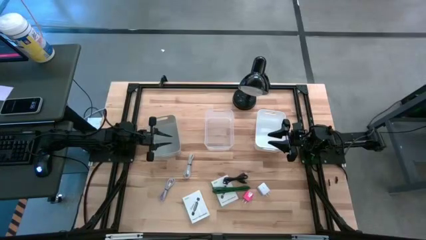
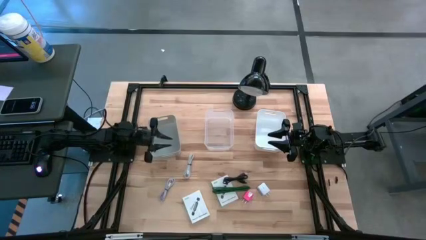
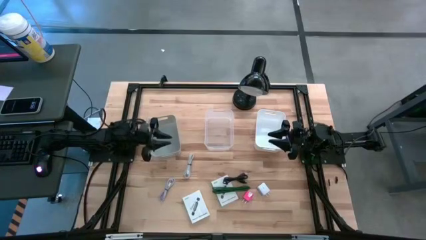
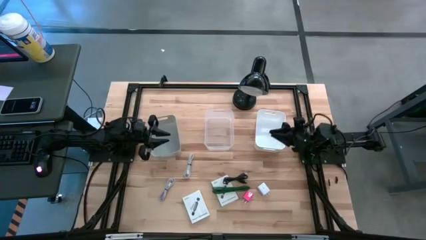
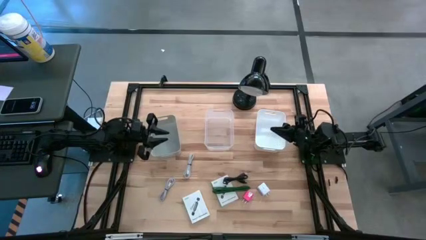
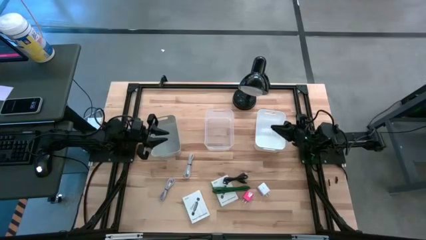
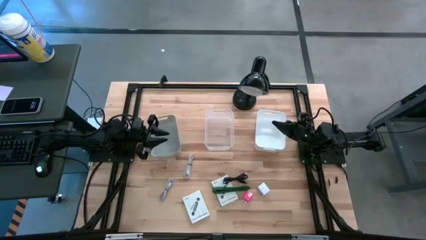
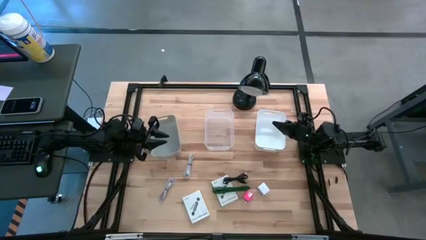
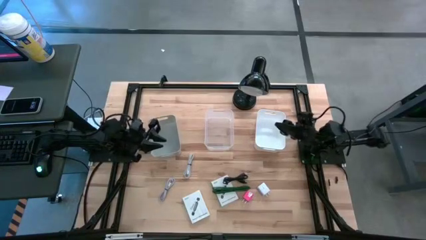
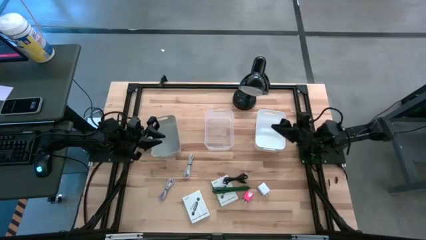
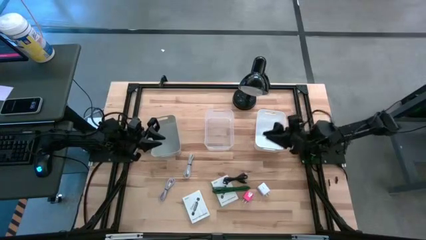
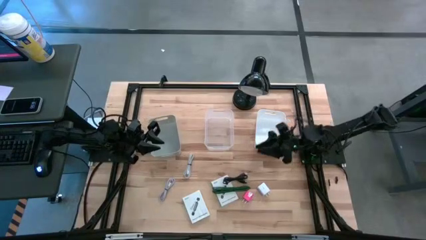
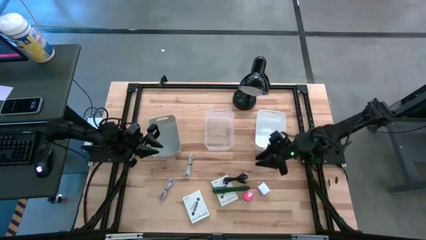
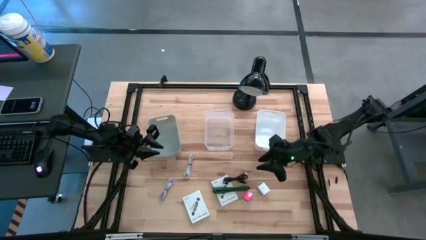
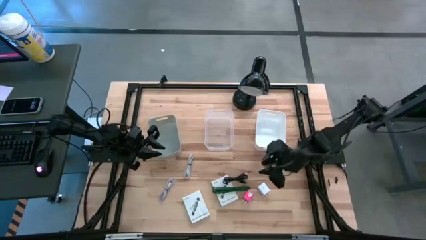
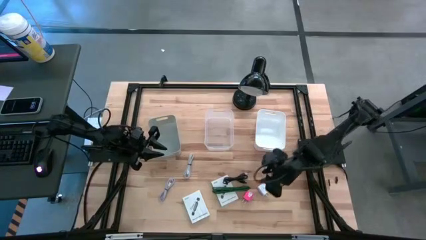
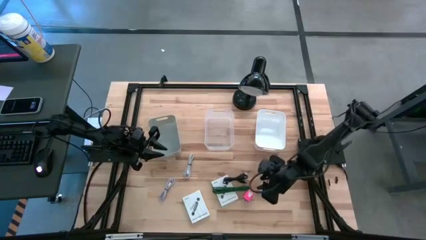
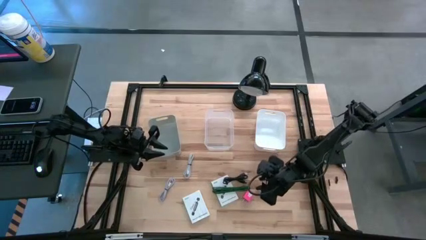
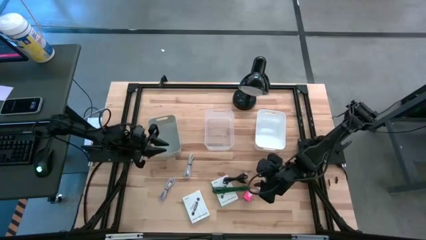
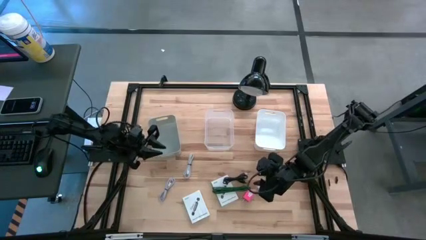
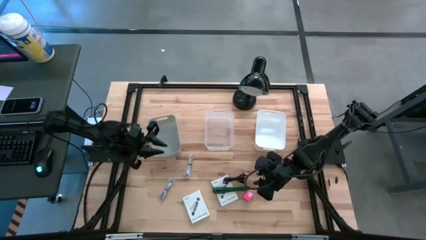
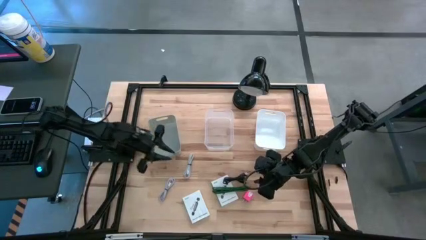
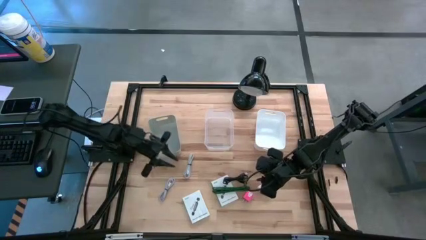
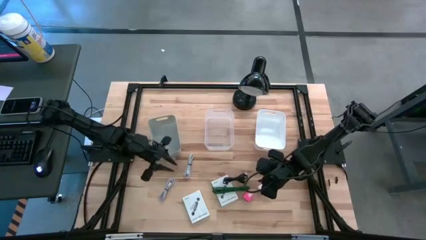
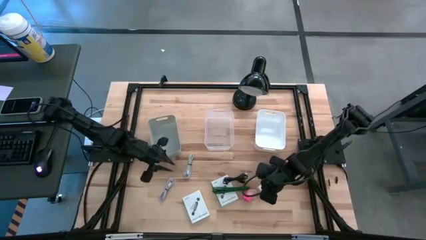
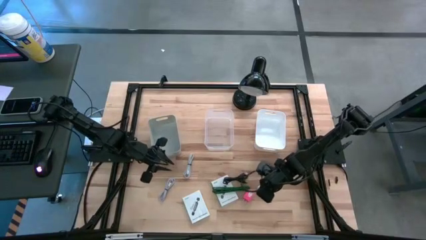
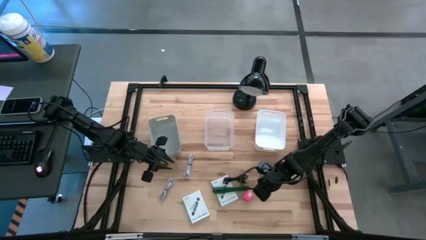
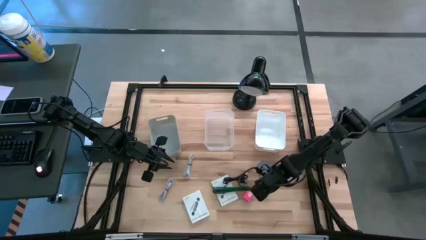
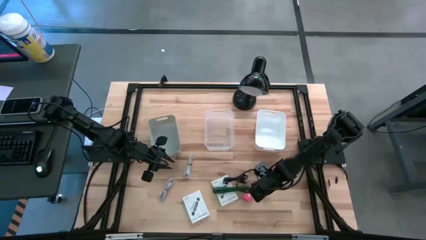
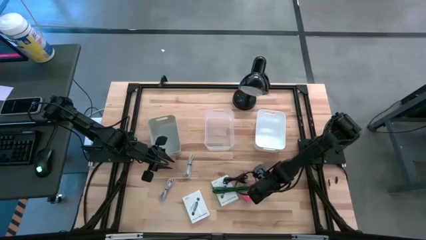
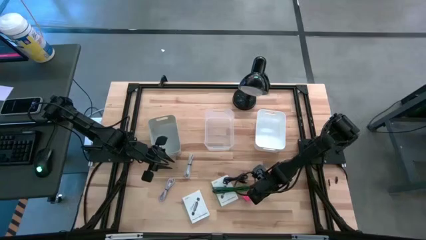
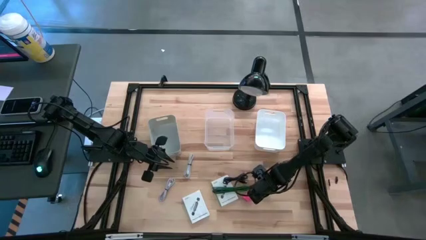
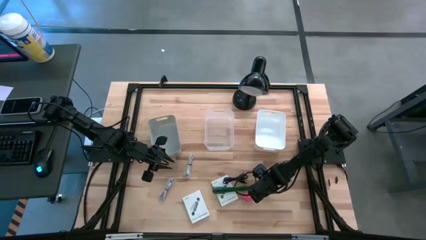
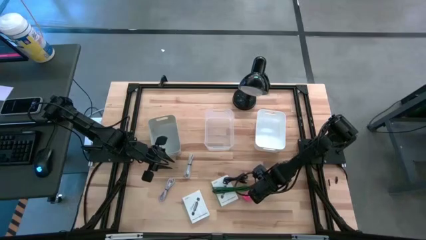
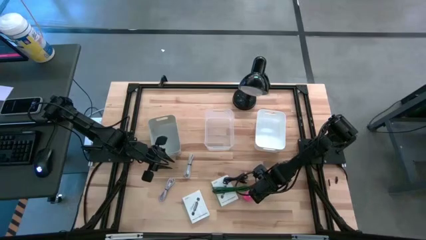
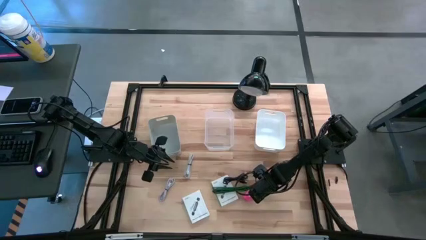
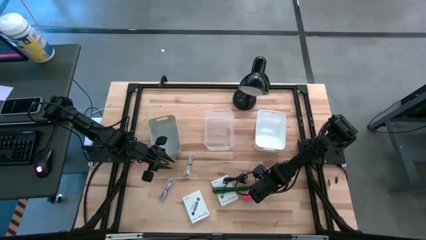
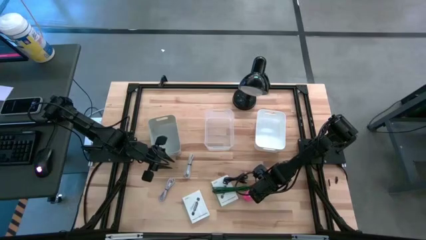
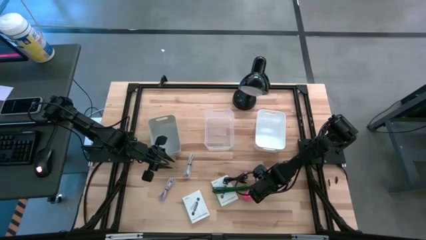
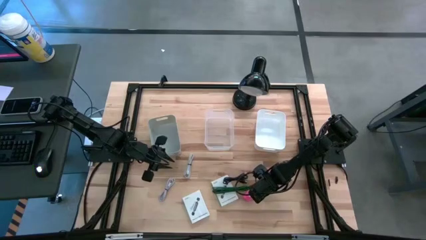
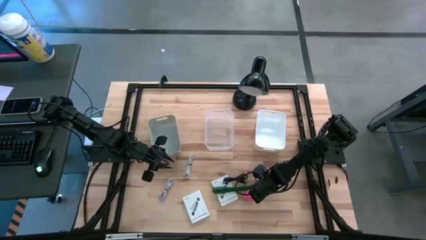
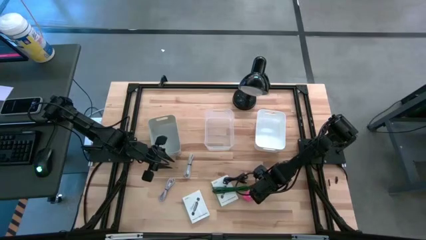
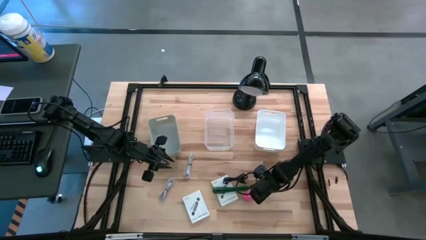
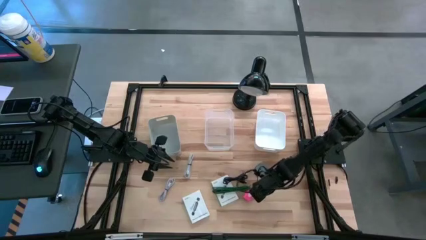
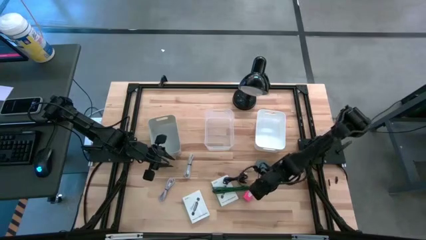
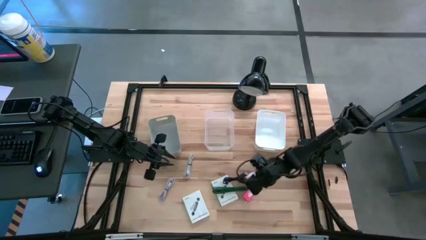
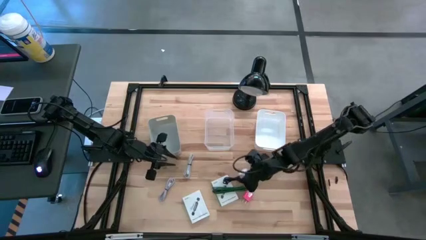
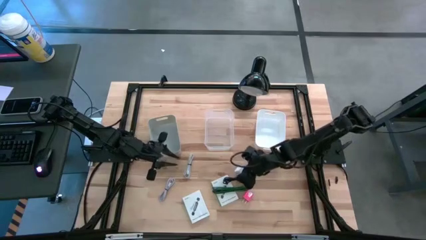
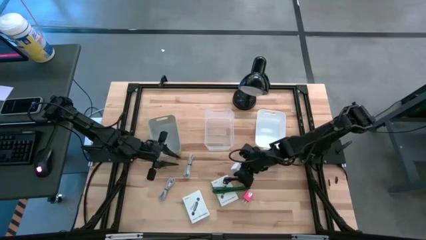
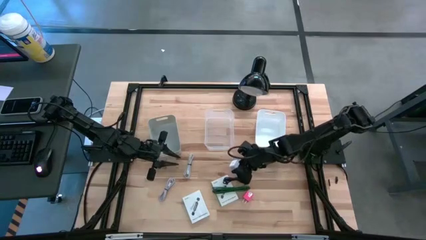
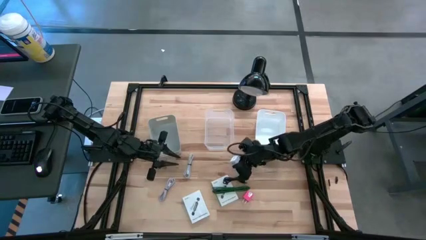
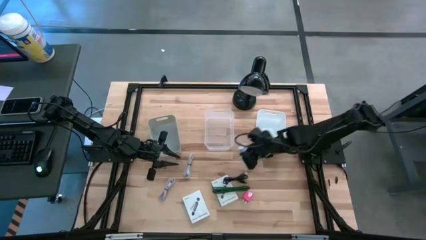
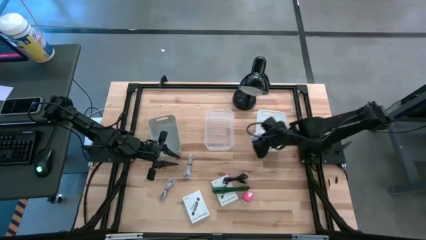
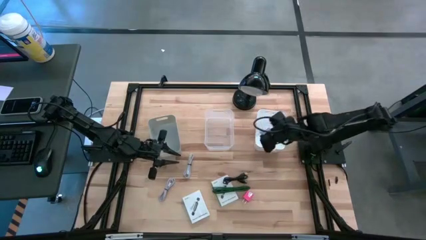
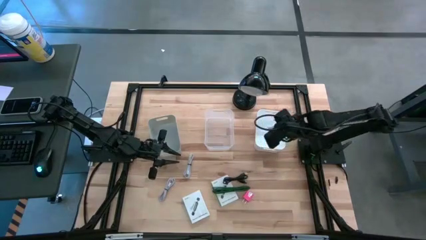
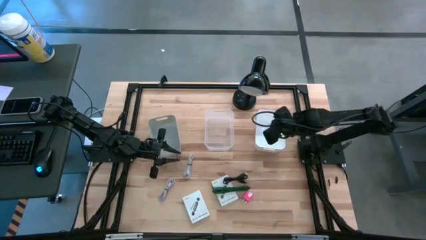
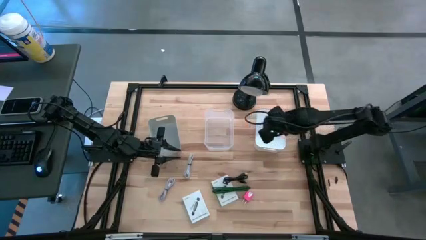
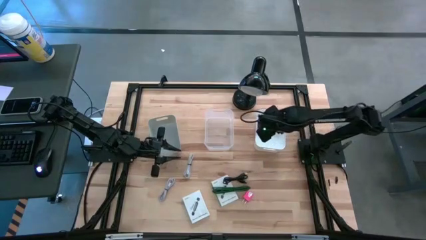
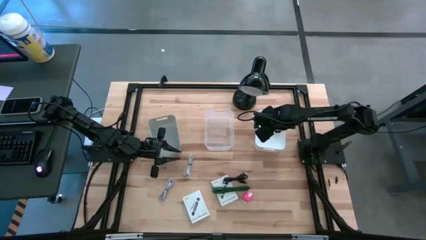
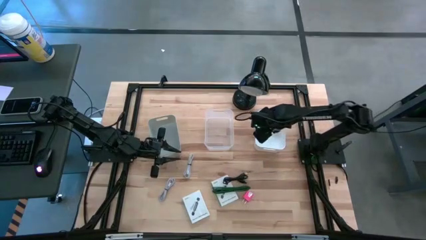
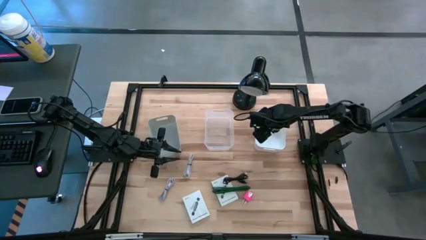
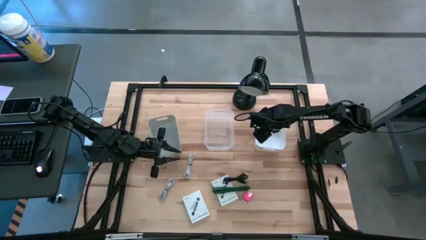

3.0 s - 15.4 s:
Task: Pick and place items into bin
Put the white charger adapter into the white bin

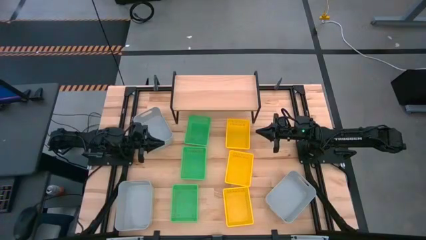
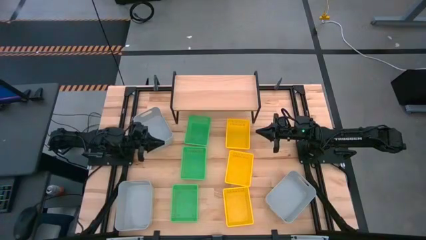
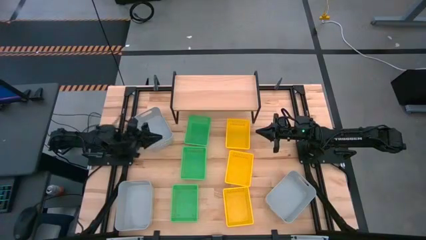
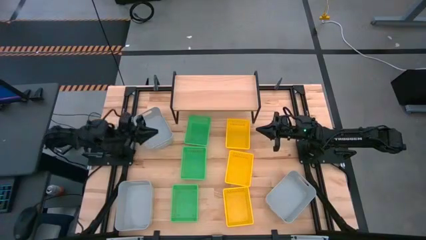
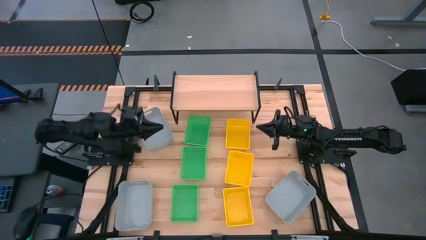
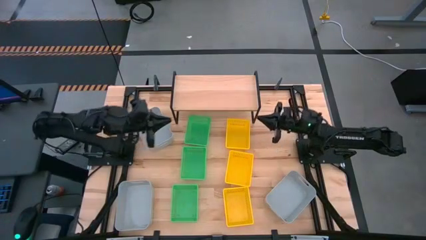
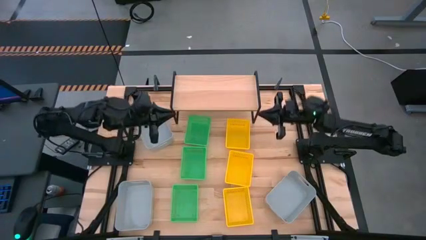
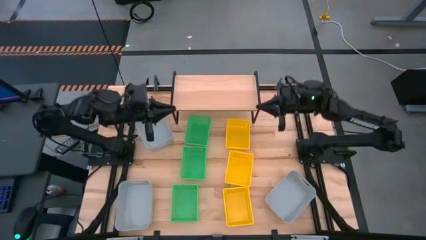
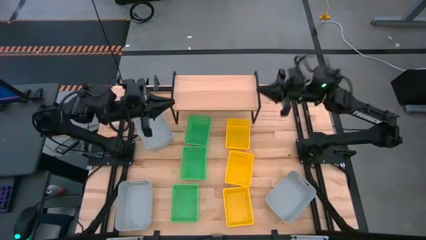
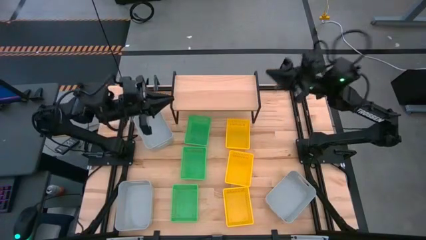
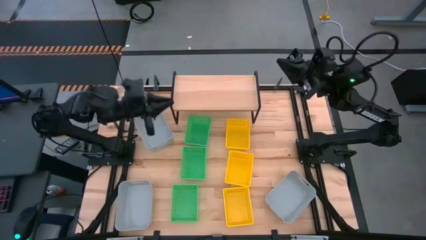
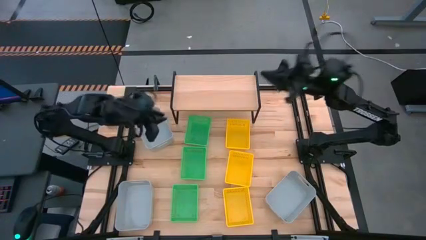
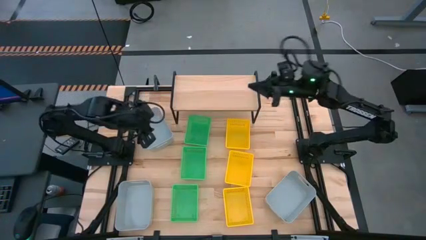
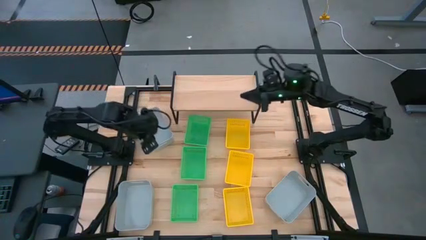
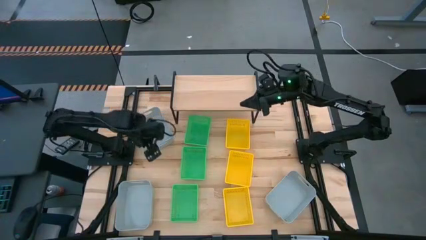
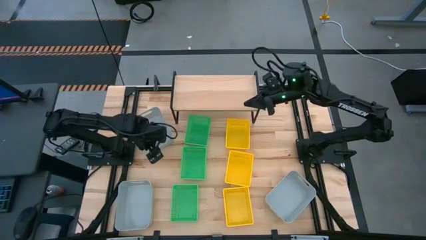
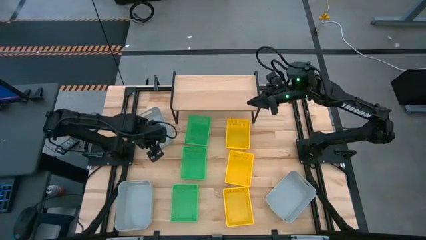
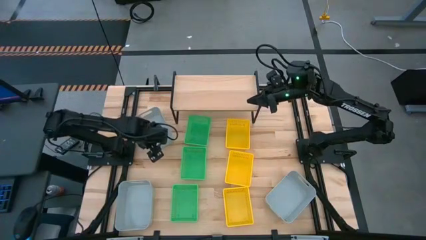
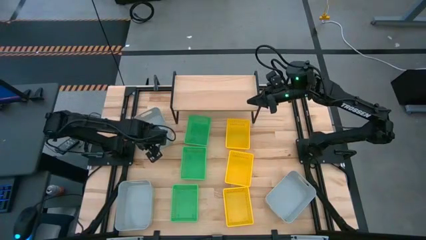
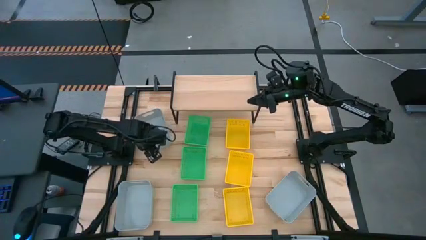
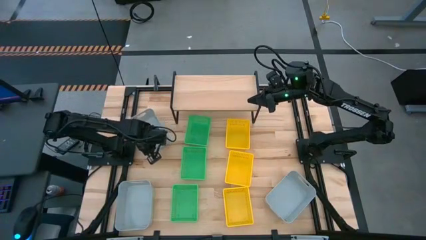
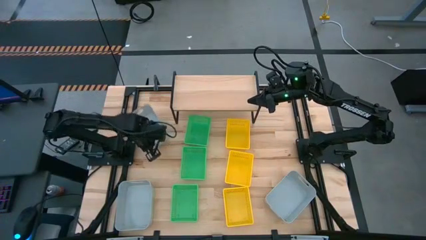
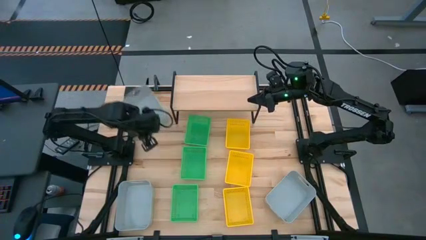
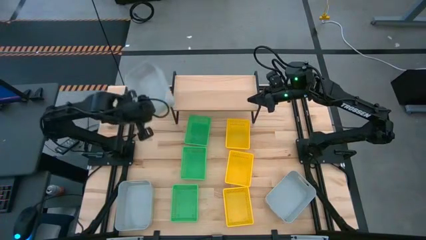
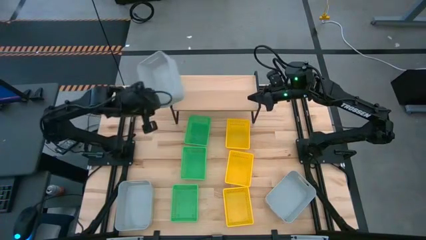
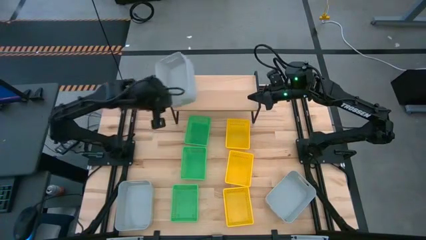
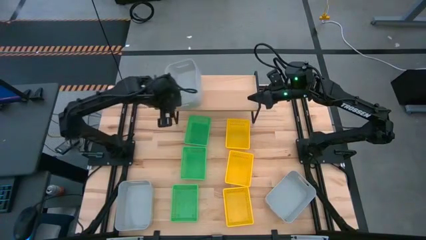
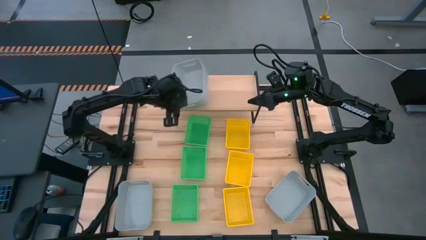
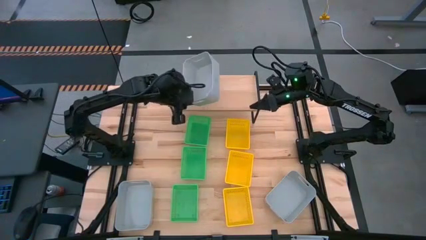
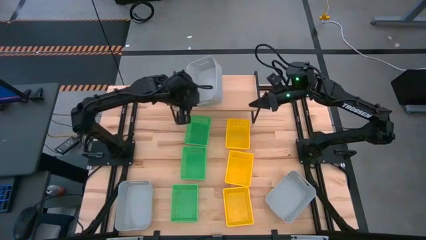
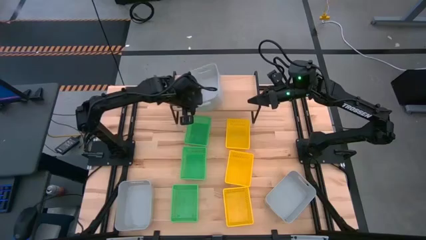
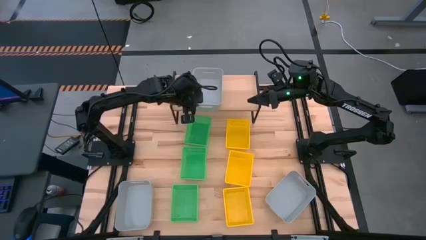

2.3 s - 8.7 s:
Task: Stack baskets on shelf by color
Put the top gray bin on the shelf
